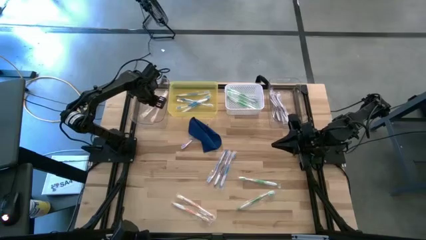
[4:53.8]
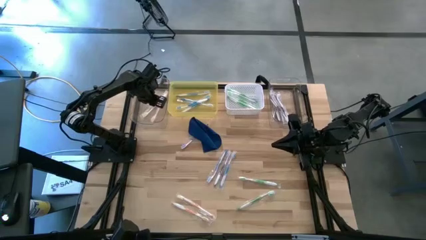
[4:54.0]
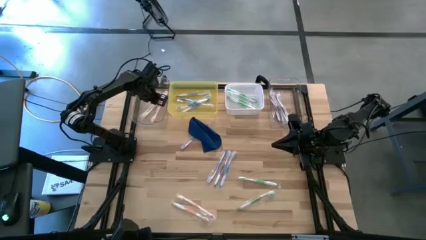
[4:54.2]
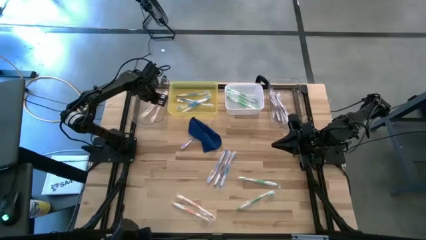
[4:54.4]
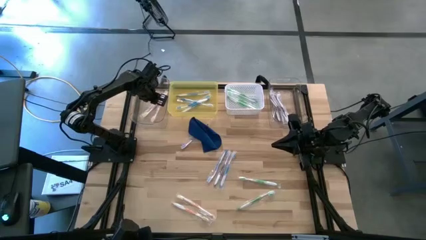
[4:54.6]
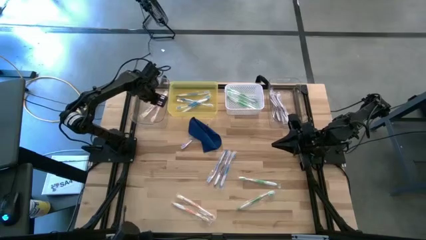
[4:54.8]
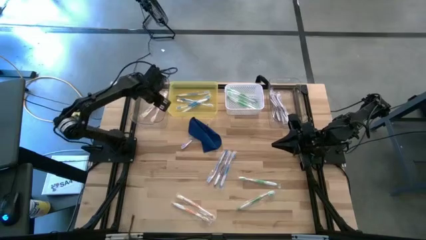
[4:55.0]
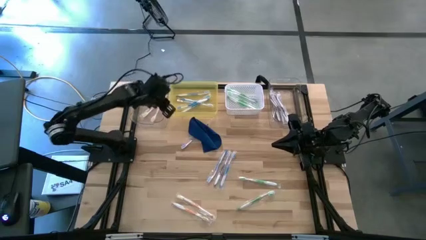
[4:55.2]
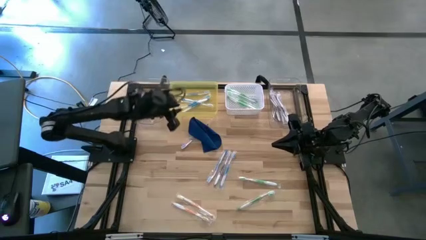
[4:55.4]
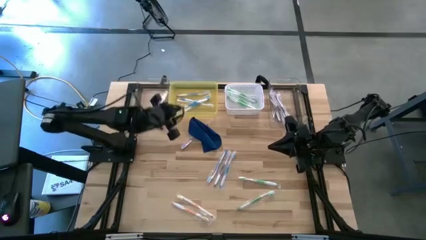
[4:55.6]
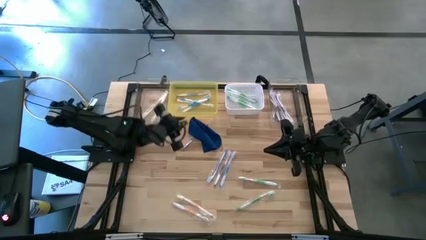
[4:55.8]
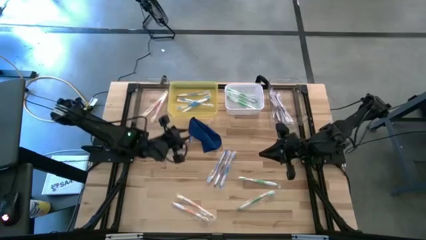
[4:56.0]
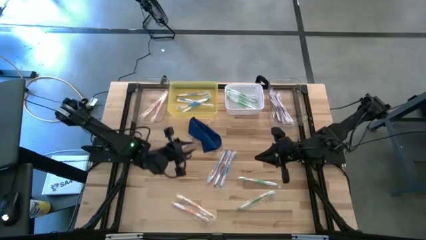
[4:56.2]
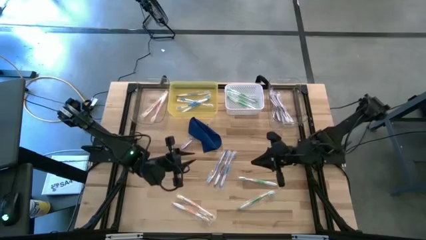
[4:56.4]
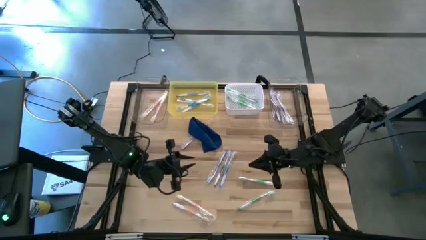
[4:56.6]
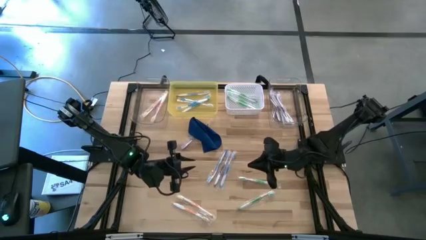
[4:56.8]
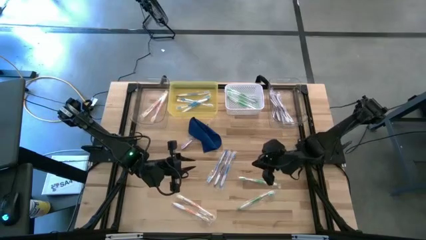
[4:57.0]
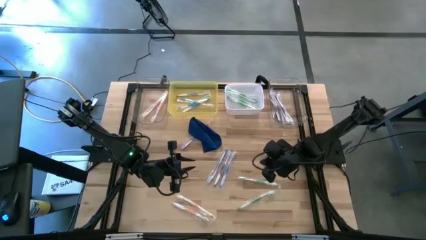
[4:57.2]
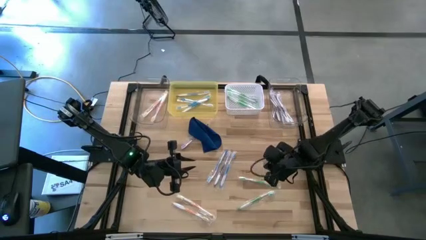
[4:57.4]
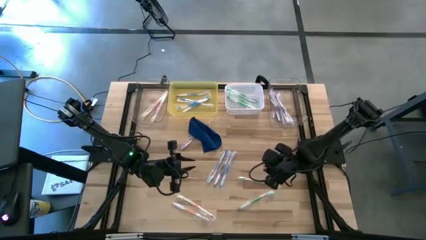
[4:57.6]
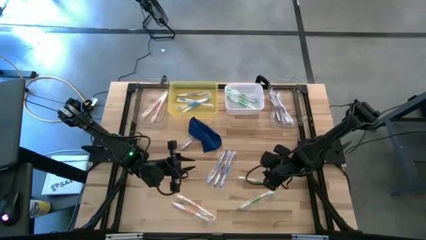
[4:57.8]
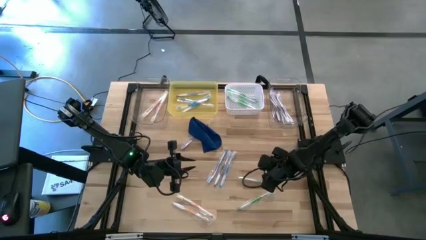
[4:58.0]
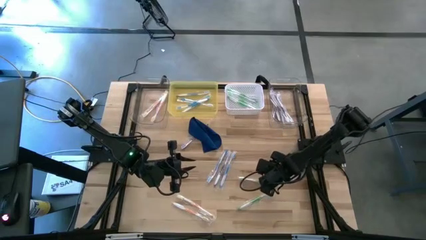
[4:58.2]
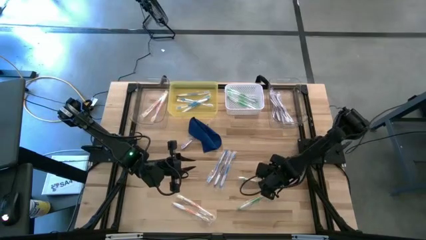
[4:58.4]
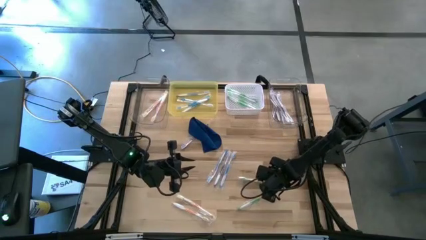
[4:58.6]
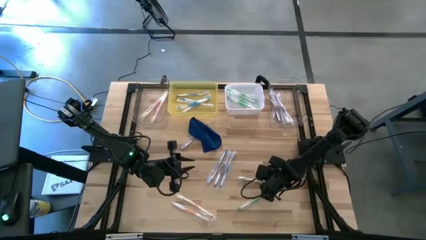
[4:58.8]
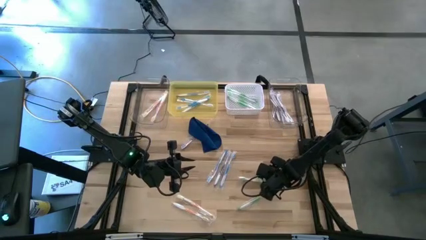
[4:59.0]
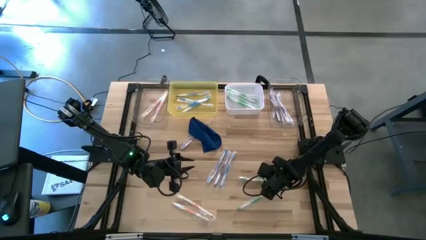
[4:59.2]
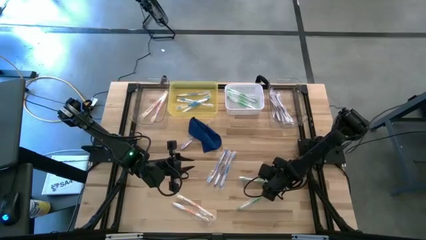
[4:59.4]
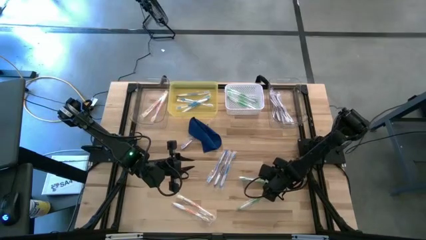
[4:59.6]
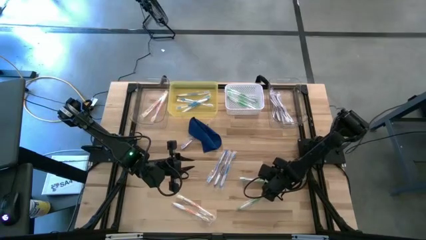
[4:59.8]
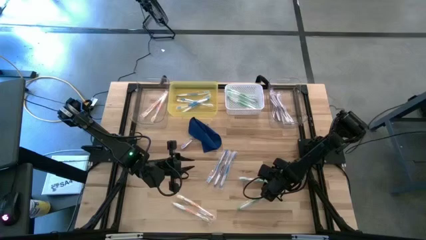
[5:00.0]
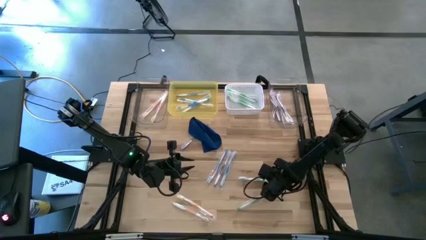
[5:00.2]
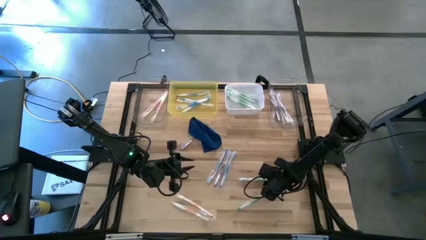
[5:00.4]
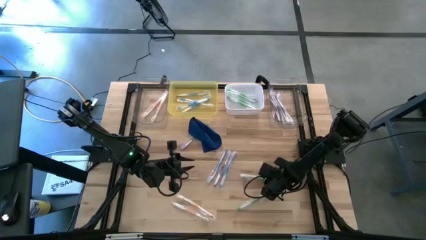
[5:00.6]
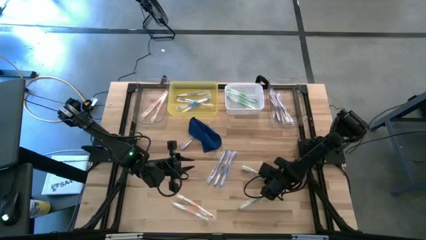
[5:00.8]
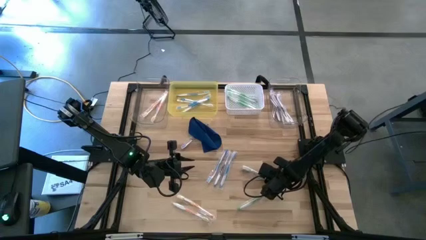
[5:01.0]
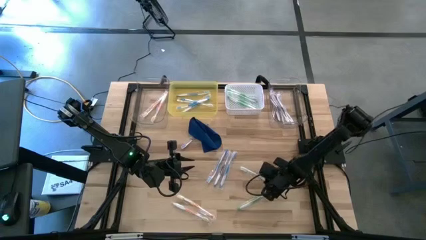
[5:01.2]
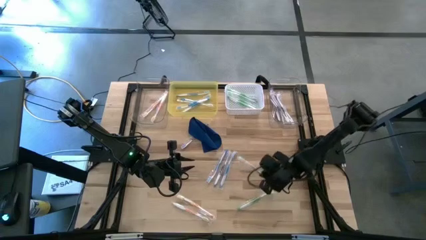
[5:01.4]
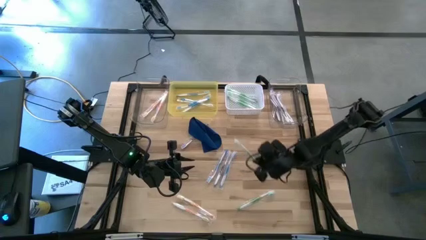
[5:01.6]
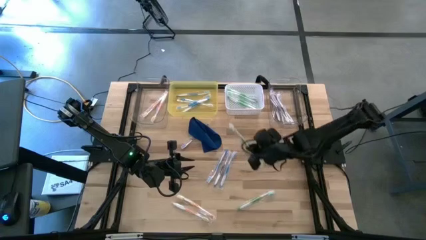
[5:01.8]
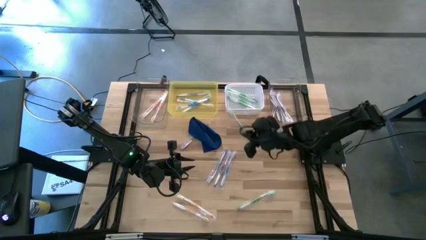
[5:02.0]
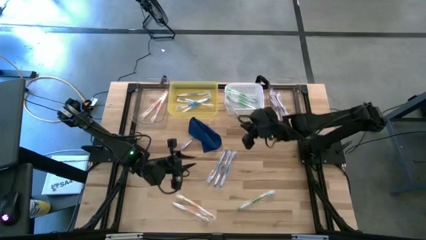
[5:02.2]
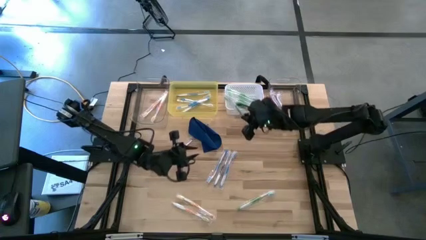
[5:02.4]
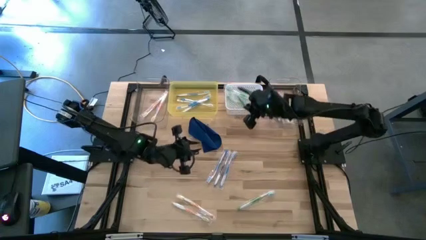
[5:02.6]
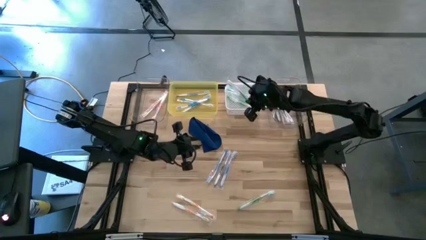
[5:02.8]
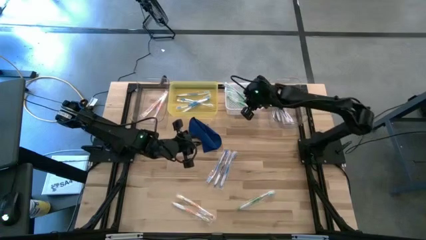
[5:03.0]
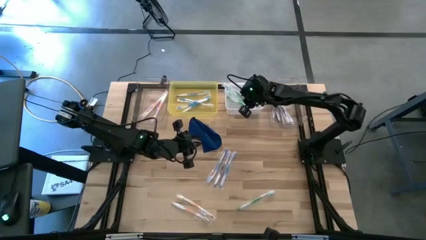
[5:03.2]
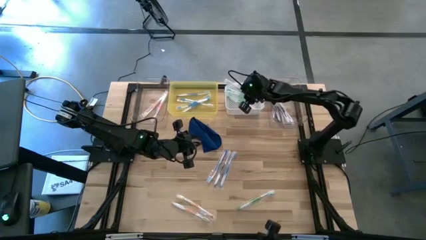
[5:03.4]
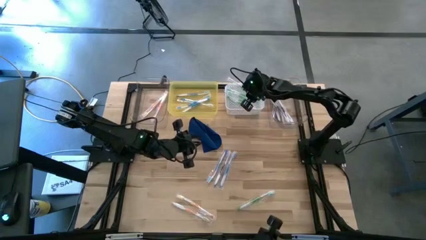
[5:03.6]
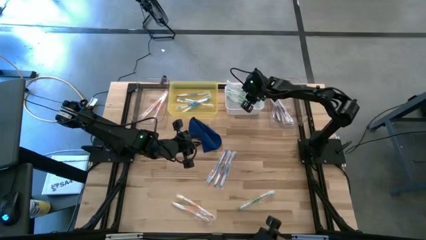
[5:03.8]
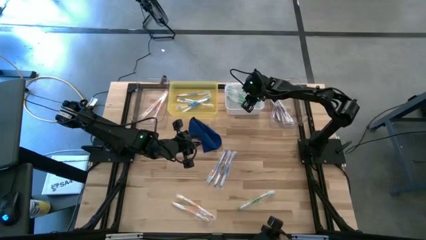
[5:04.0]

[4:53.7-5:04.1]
Task: Pick & Place Toothbrushes
Put the green toothbrush into the white bin

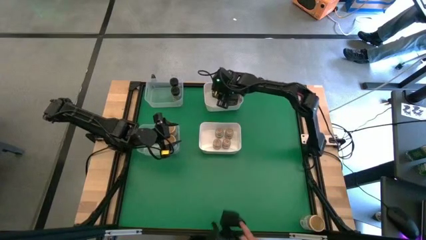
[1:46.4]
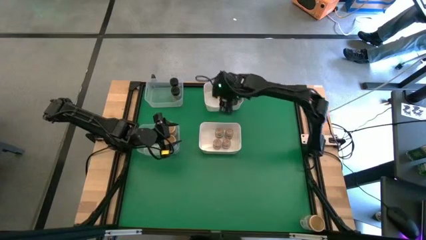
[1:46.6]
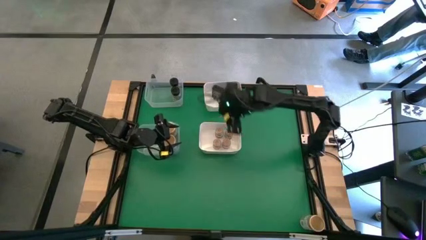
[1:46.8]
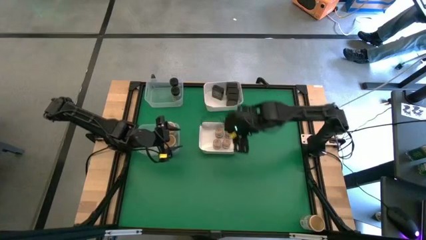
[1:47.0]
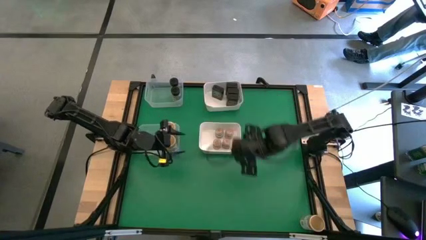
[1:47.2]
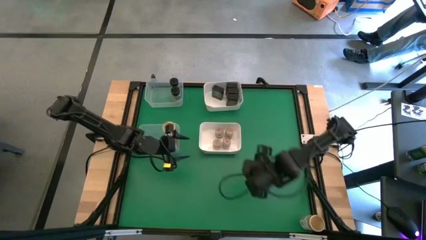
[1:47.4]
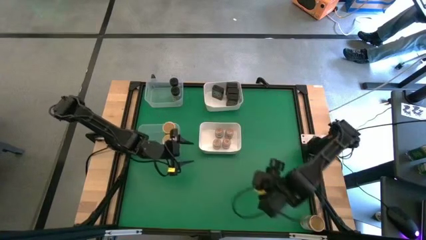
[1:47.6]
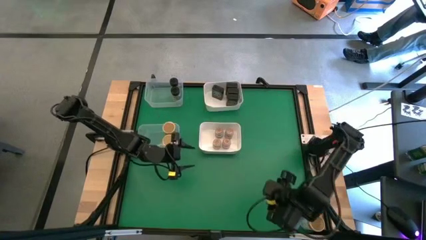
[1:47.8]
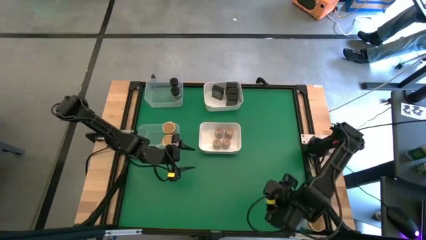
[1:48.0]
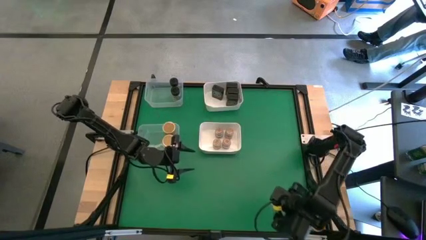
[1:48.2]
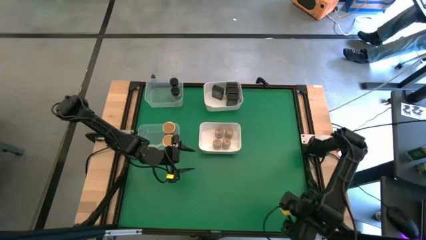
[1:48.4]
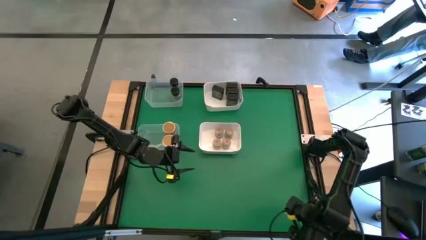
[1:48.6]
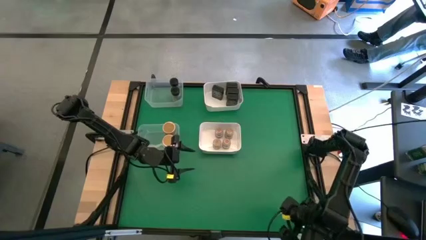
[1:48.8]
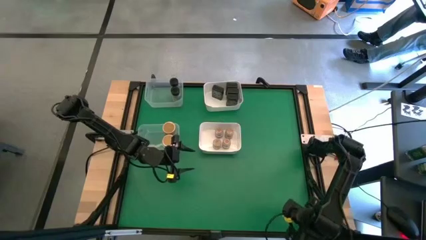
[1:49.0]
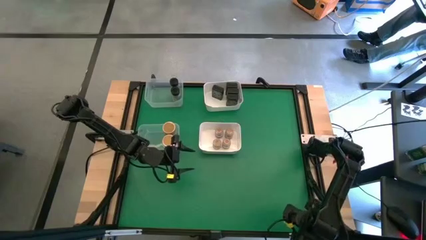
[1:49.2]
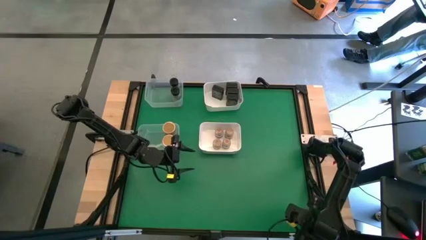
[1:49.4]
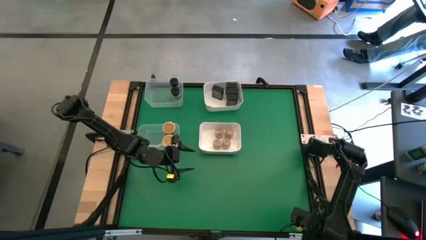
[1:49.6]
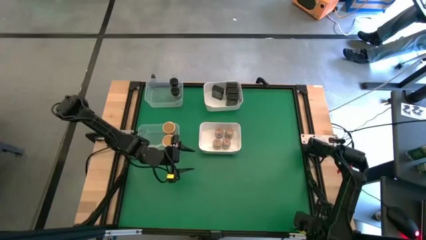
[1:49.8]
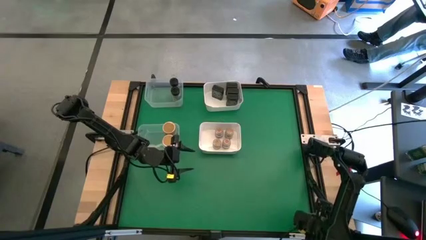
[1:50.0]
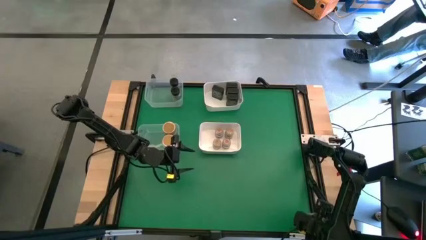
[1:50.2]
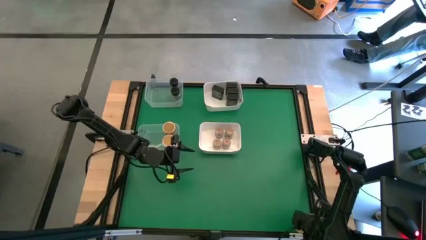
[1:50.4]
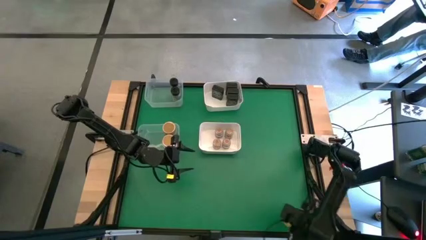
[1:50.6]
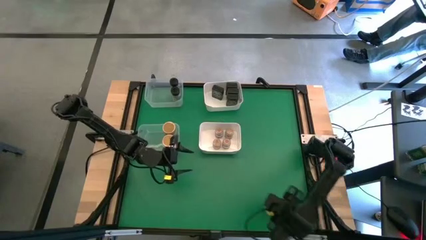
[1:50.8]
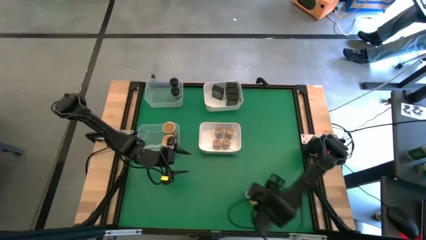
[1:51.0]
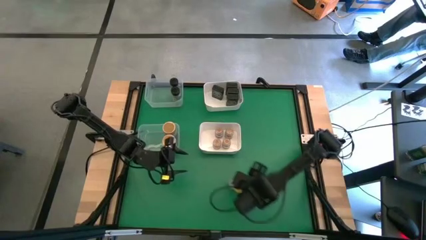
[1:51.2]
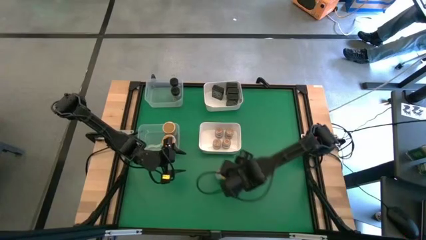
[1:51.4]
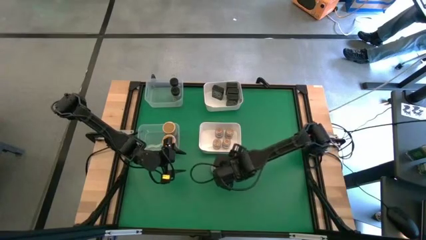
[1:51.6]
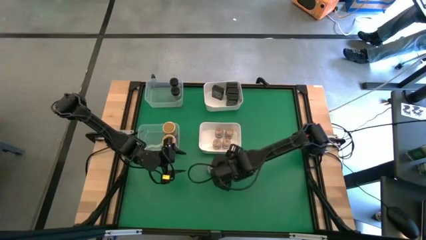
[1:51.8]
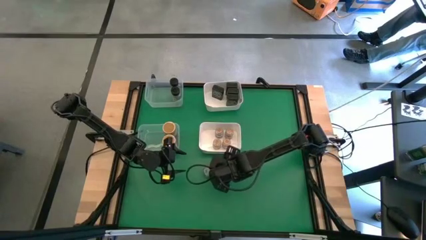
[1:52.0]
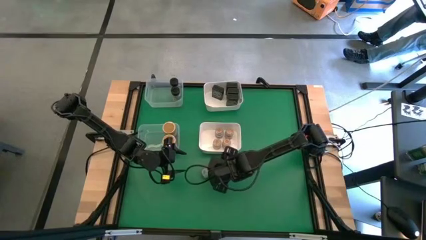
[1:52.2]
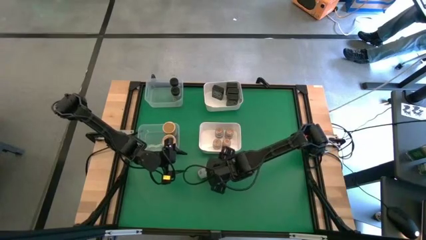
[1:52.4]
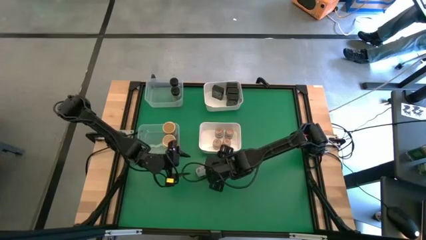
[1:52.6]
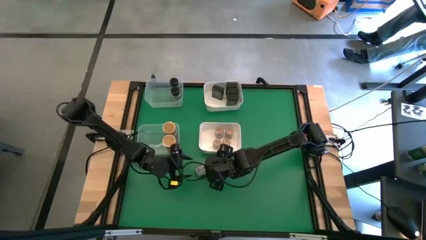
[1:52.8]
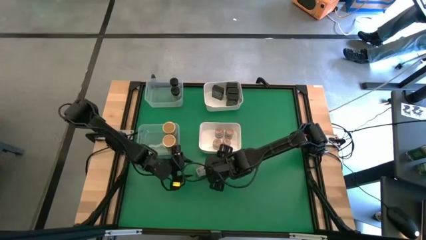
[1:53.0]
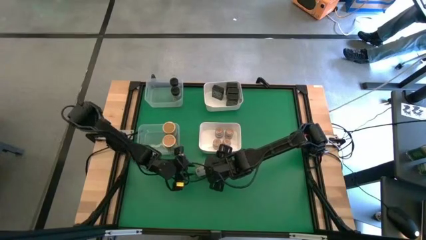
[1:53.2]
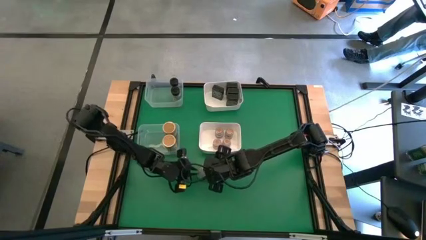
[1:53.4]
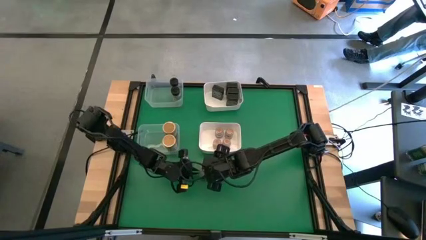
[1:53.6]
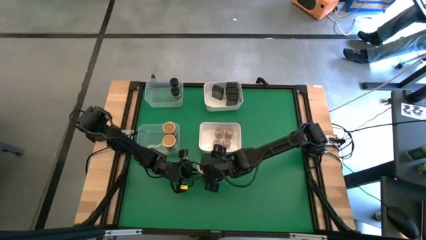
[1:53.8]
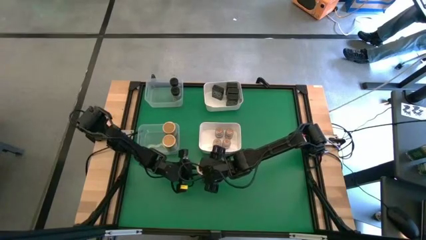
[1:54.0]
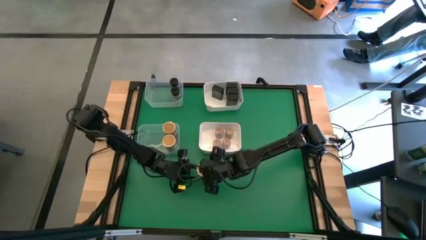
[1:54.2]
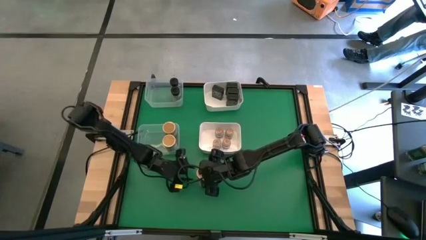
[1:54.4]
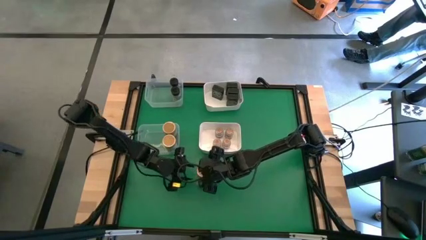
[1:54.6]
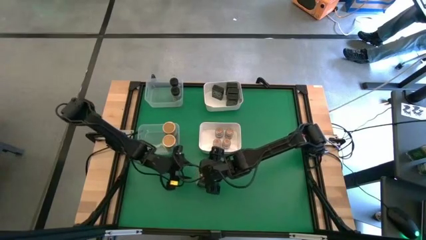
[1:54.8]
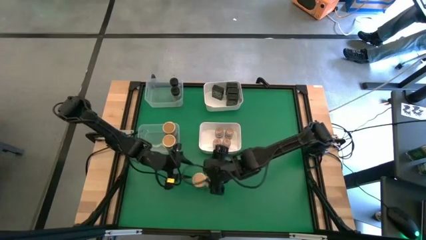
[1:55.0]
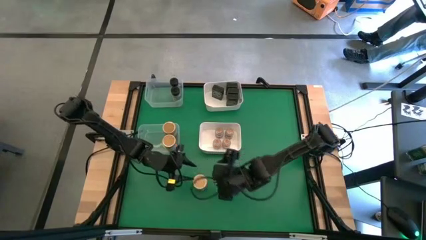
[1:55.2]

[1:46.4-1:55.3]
Task: Sort spices by type
Move the light brown seasoning bottle to the center of the table
